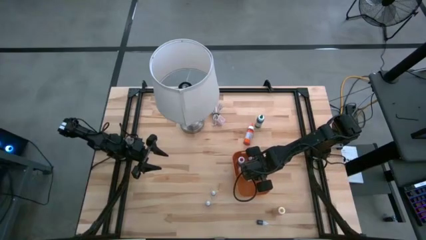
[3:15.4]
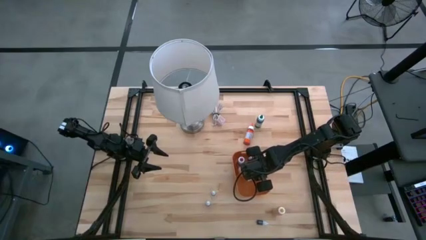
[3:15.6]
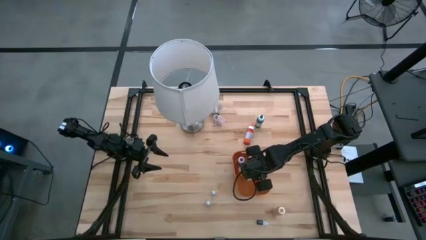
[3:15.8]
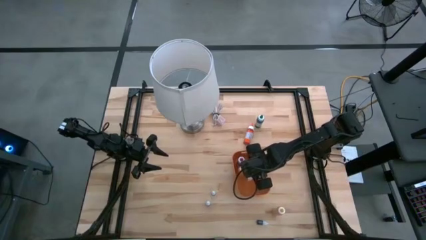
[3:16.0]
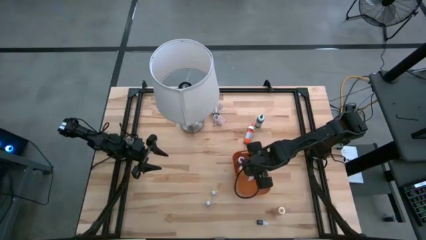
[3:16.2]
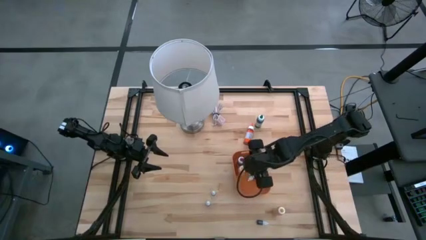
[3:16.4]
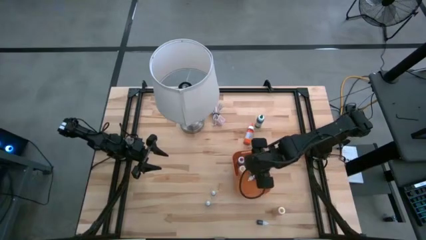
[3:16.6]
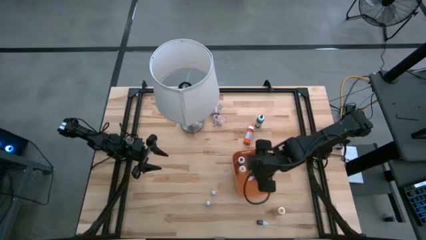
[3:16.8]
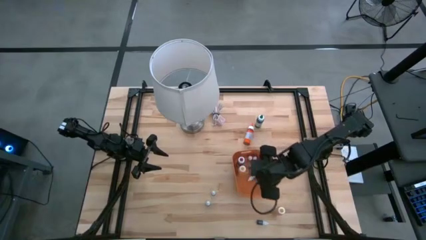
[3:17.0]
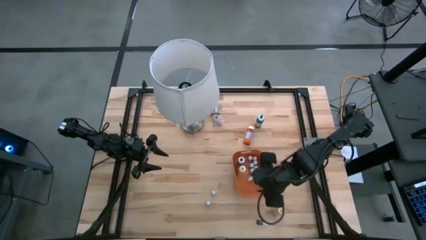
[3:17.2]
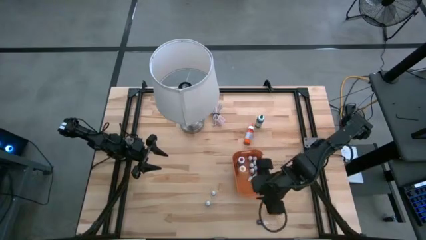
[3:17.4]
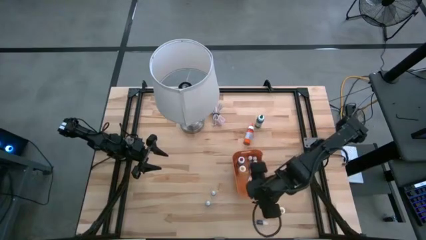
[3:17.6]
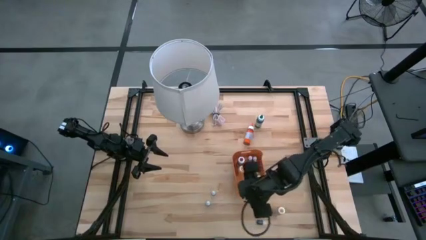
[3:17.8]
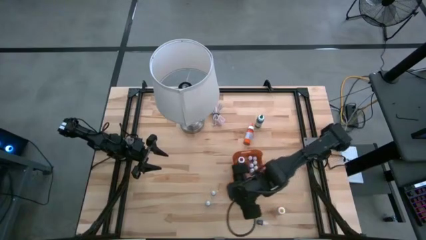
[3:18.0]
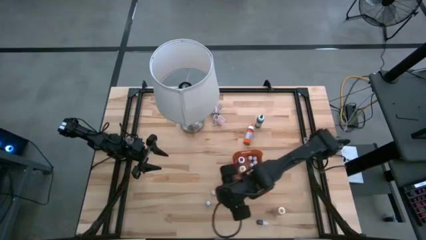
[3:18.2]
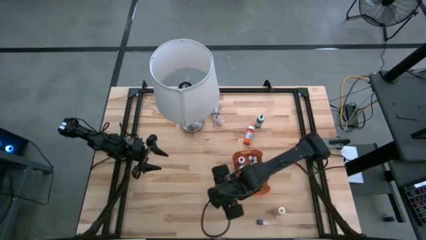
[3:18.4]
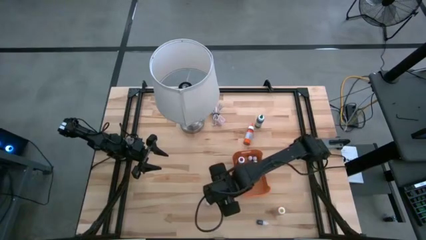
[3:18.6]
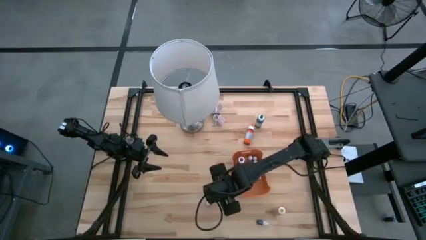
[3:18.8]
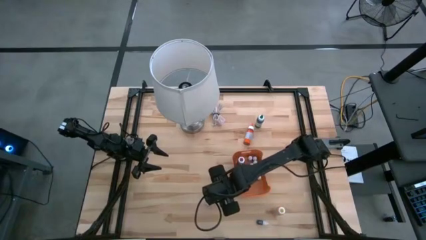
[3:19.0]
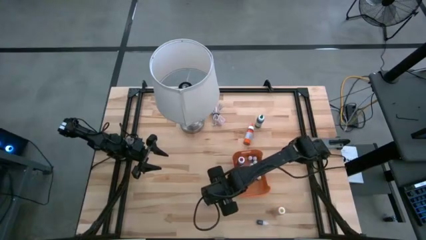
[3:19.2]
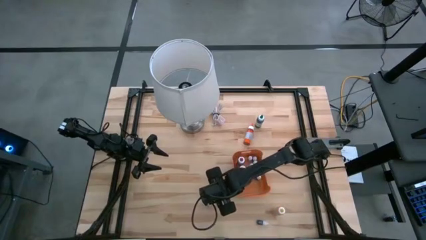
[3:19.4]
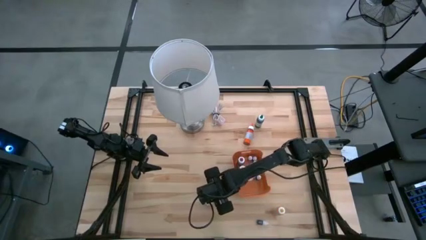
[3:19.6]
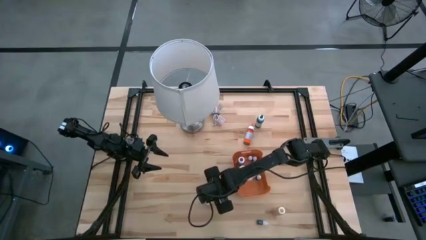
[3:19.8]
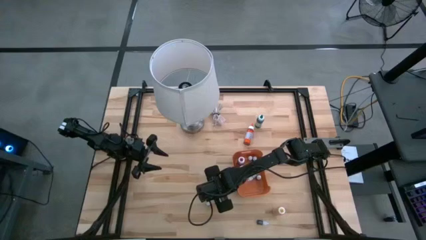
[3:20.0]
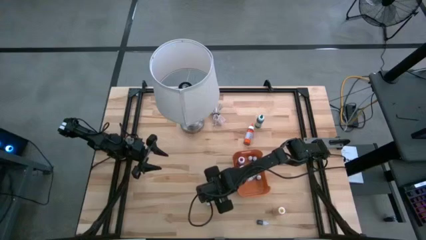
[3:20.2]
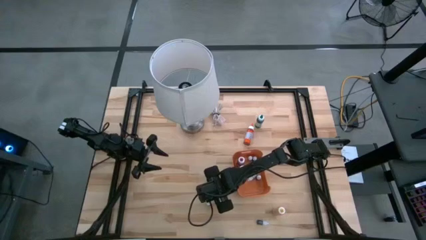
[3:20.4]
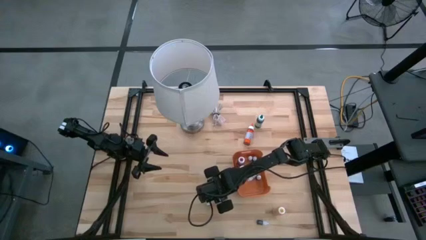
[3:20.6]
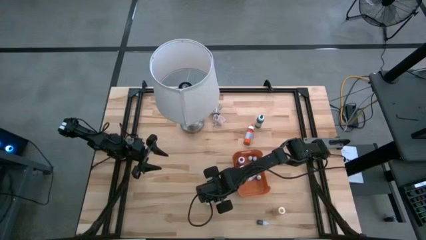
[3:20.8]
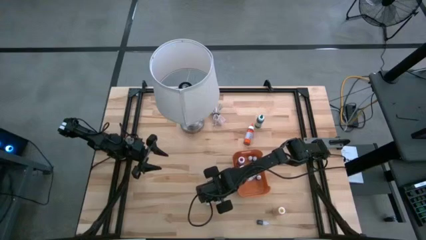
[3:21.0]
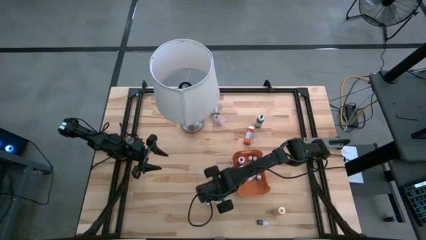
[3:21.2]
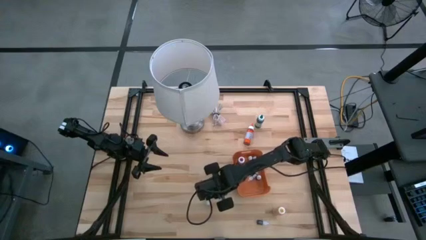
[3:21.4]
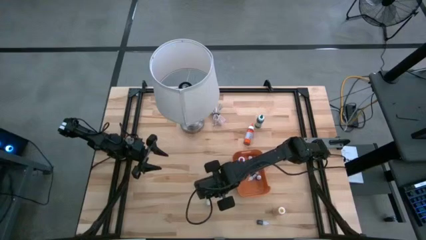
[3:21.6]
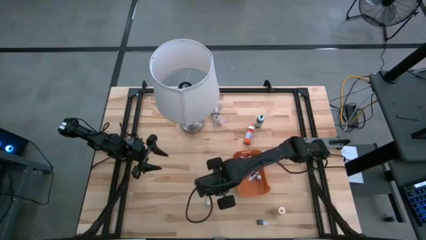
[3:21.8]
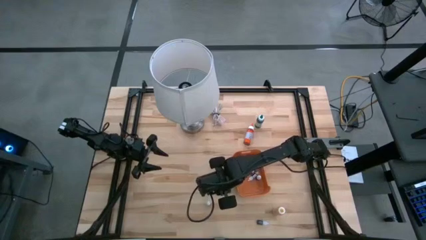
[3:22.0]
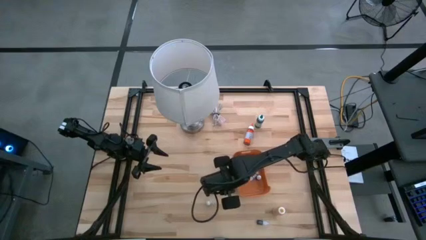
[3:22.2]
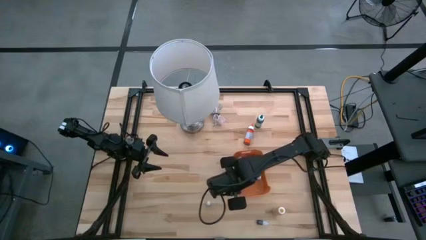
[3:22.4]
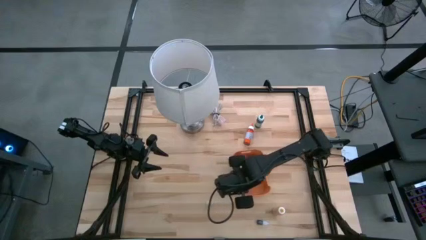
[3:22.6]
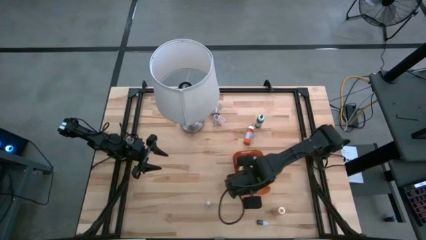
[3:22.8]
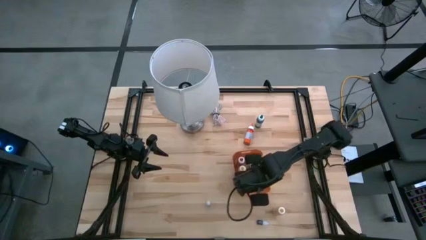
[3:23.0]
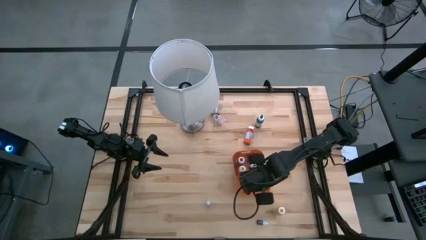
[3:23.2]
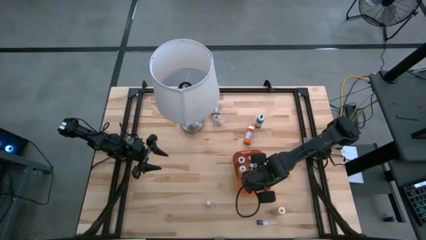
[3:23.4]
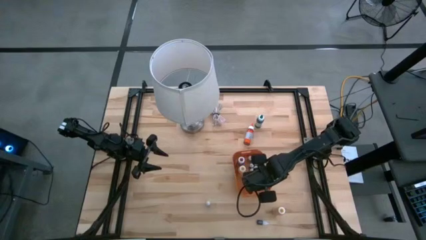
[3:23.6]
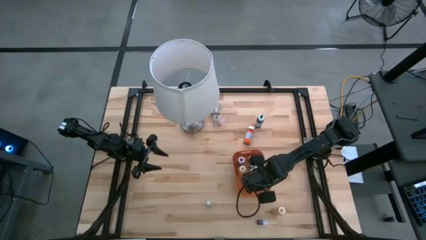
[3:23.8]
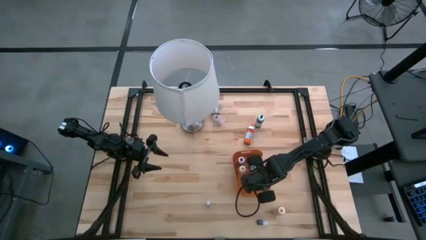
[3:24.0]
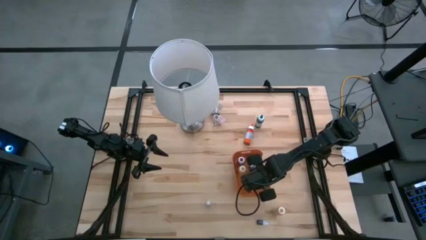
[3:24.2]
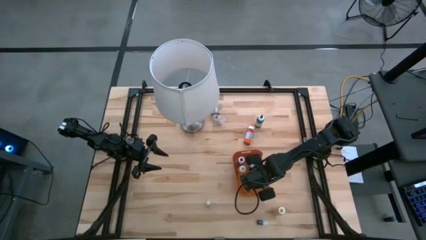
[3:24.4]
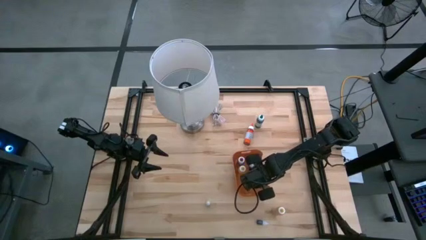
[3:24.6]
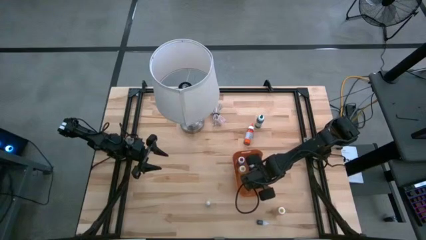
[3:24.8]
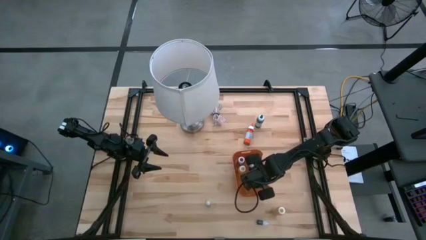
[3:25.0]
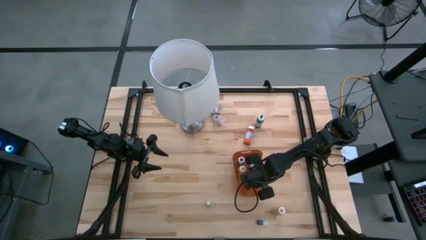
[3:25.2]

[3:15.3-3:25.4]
Task: Pick & Place food coloring
Put the small food coloring bottle into the orange bin

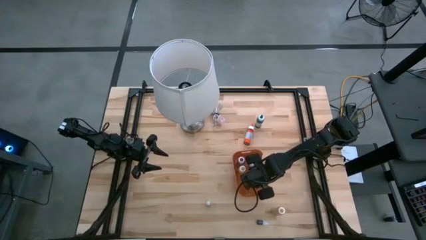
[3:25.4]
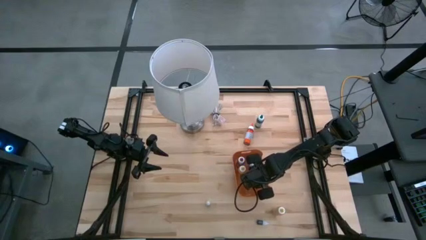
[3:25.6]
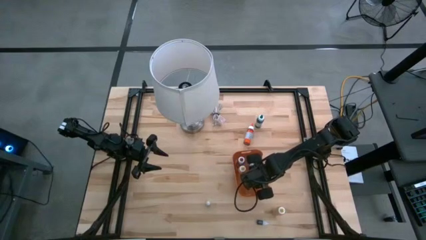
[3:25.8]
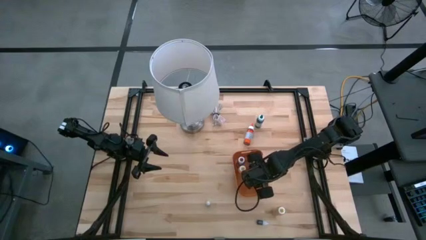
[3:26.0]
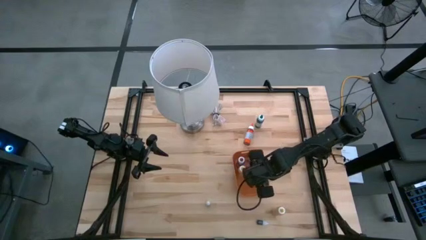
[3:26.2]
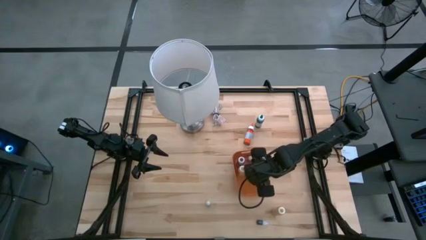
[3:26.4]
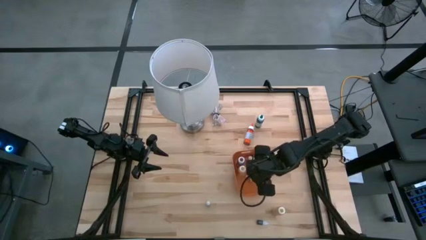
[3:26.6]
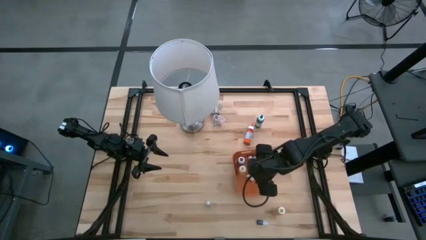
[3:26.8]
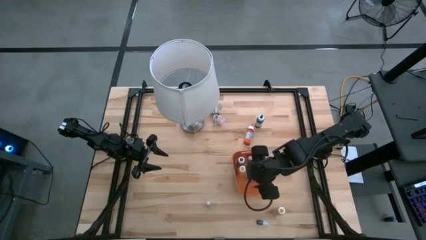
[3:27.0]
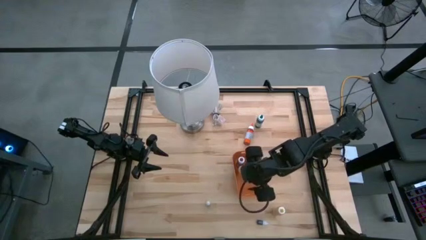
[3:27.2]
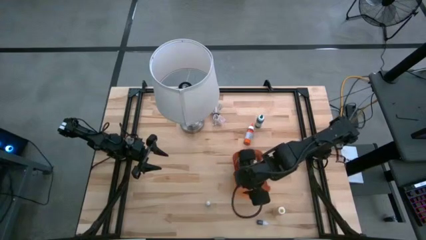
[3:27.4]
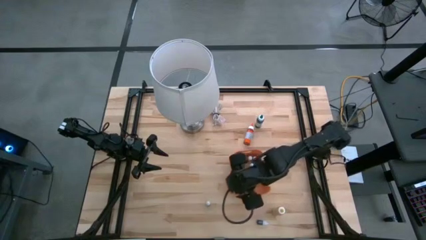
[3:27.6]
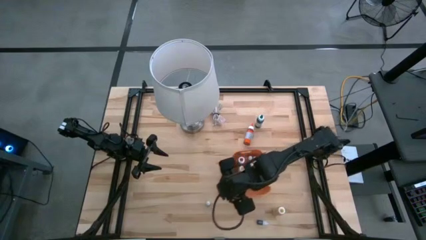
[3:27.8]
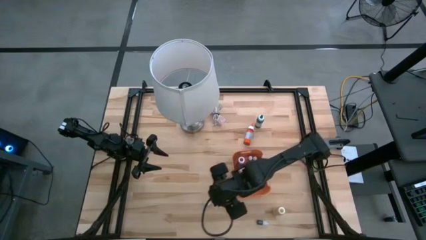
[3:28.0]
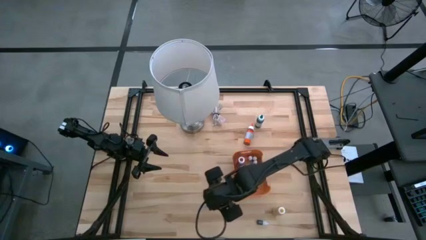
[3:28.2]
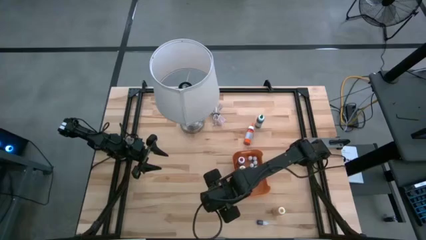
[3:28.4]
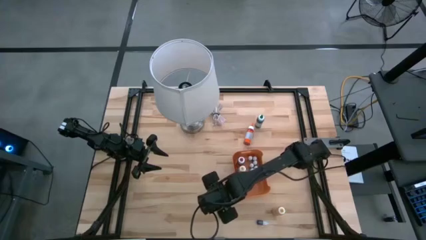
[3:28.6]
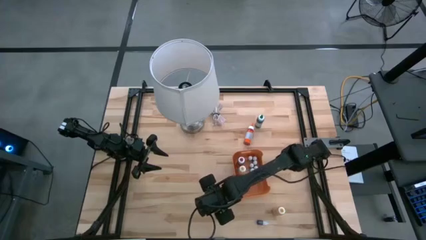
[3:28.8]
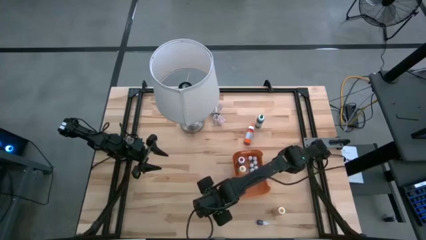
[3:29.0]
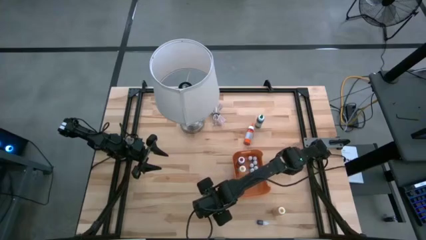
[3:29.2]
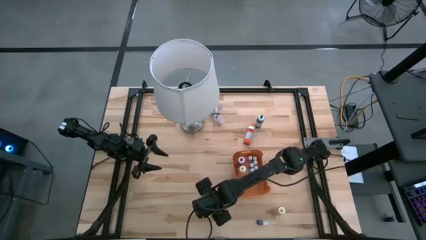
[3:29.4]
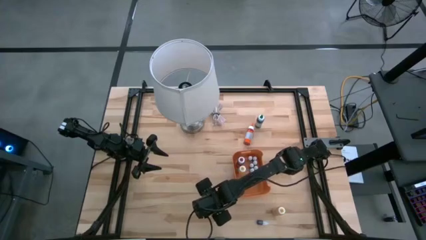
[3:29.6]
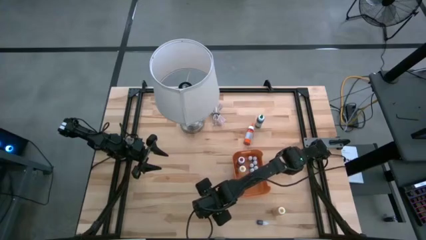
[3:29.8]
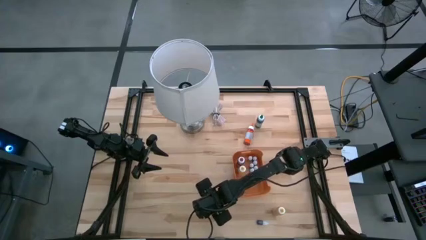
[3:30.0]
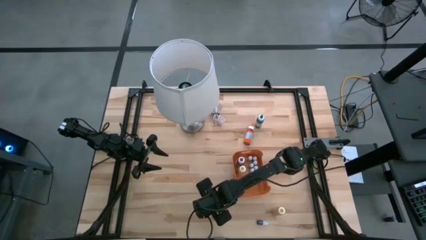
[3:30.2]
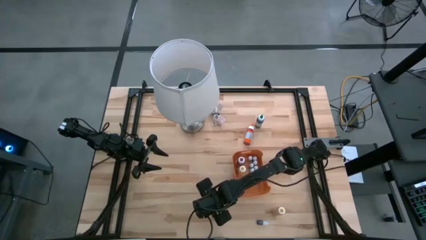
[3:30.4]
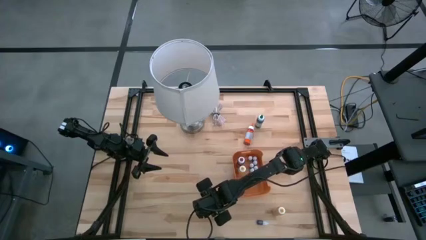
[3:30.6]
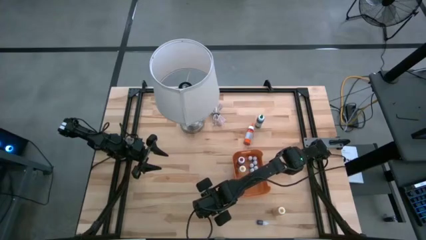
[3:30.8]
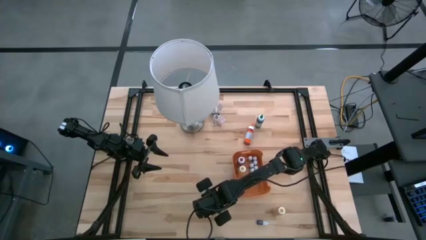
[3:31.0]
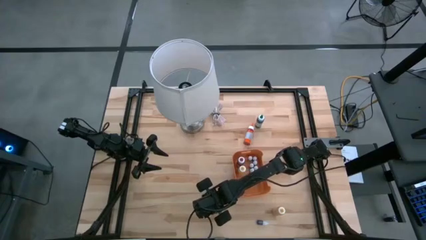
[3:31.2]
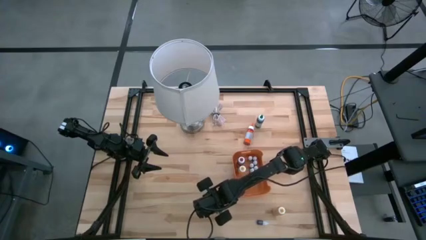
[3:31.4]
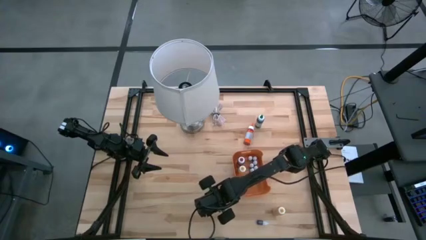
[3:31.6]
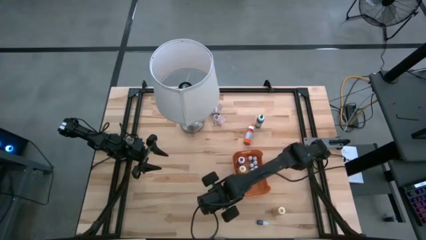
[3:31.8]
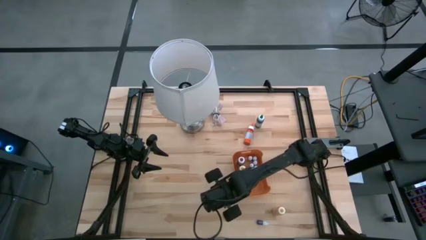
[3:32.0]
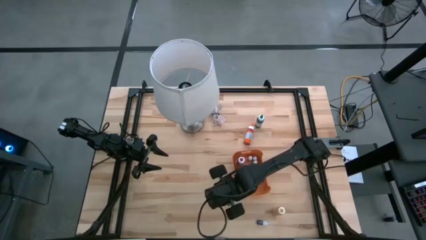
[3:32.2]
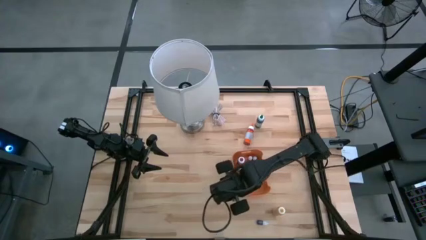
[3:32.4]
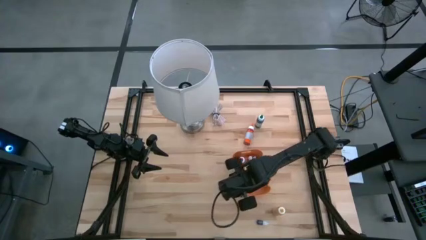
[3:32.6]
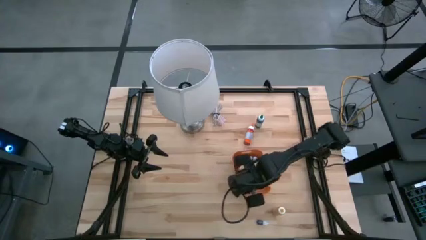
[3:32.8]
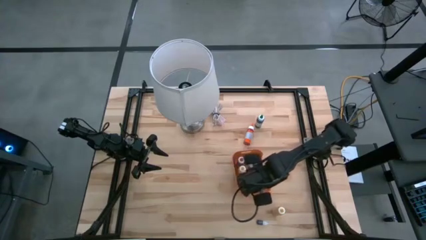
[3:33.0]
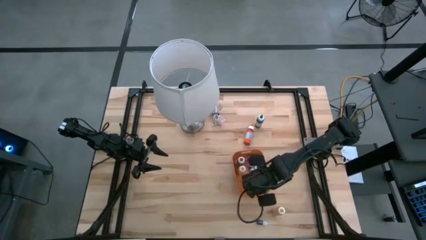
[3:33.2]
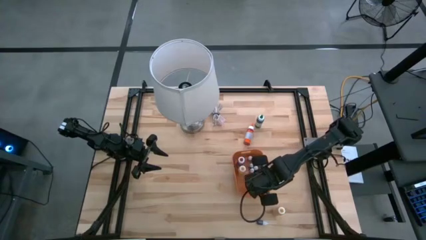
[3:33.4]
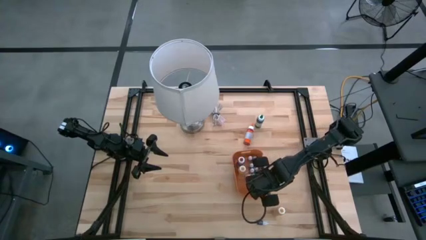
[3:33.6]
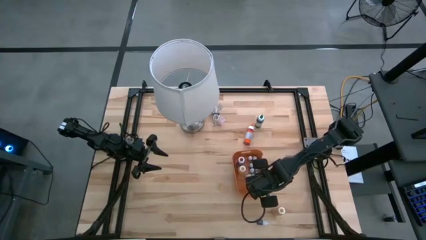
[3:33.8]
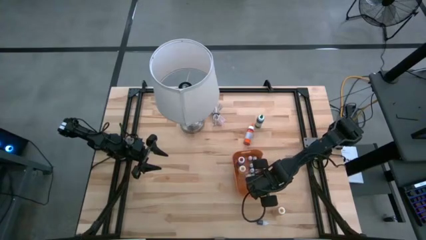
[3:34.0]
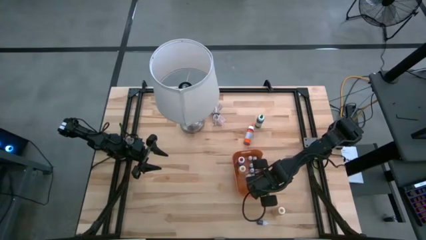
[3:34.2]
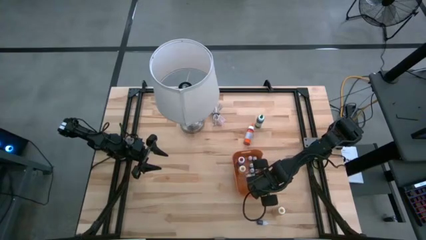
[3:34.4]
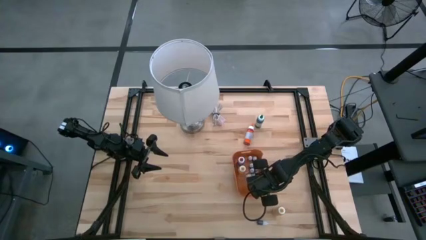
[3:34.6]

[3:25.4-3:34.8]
Put the small food coloring bottle into the orange bin
